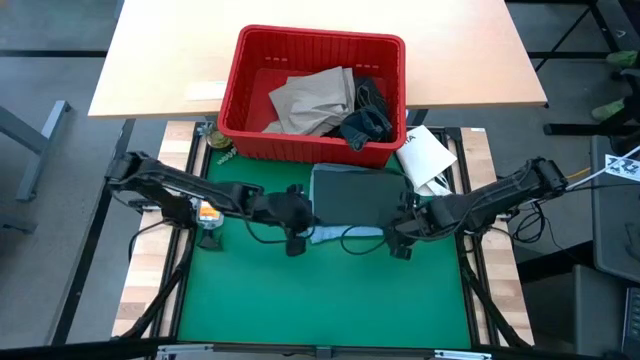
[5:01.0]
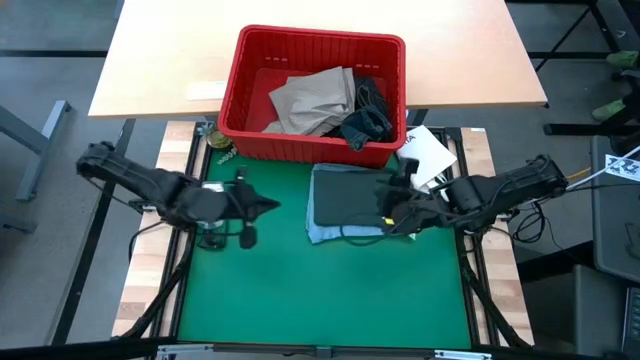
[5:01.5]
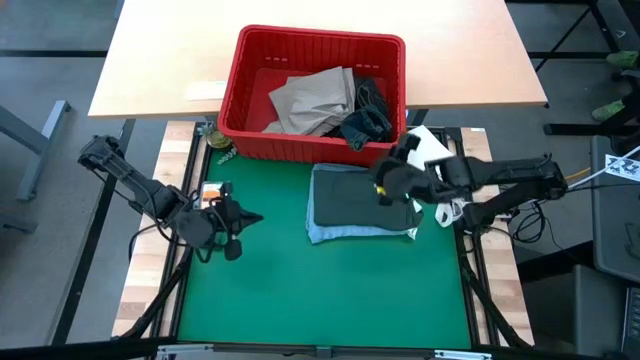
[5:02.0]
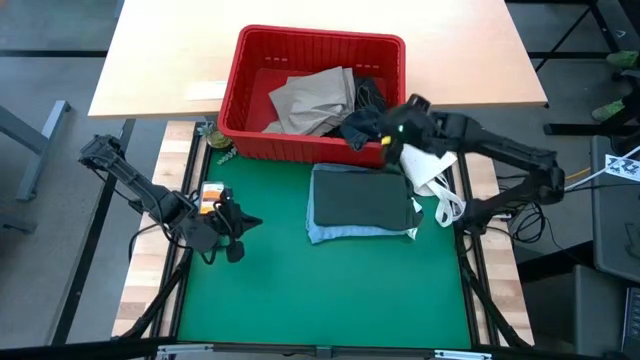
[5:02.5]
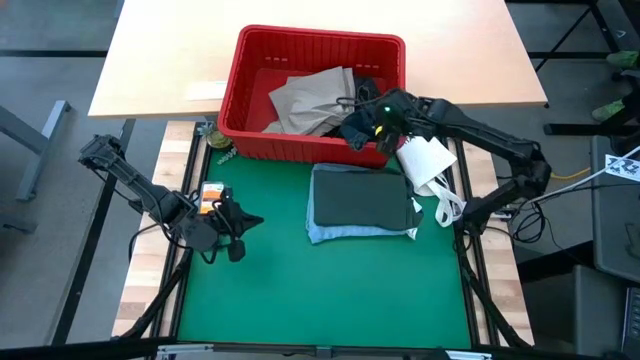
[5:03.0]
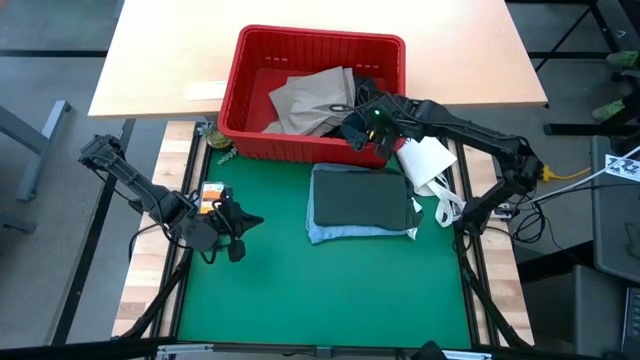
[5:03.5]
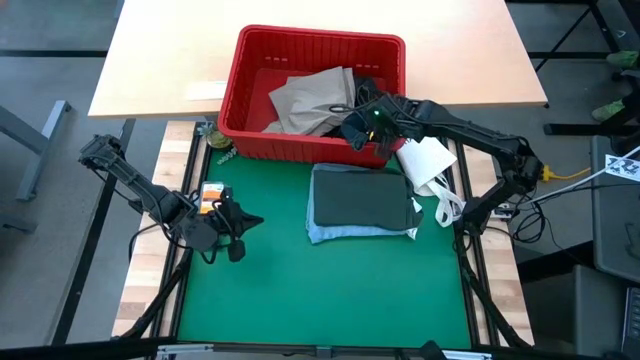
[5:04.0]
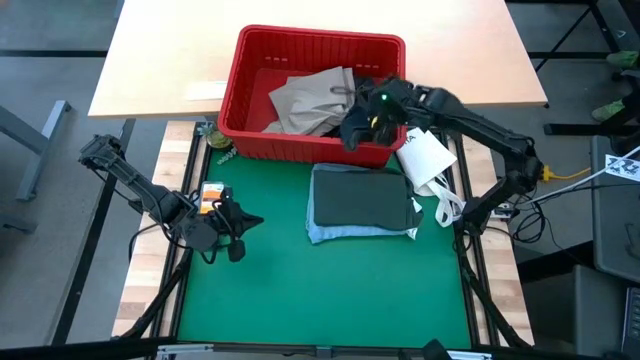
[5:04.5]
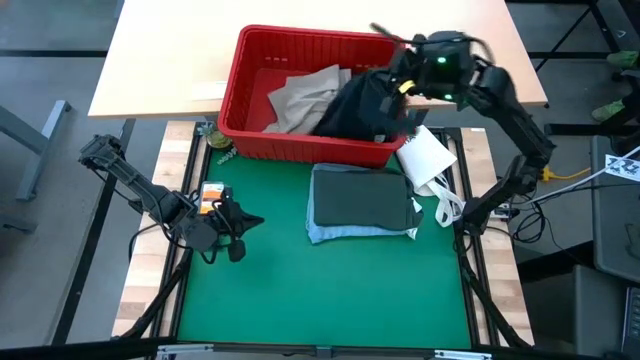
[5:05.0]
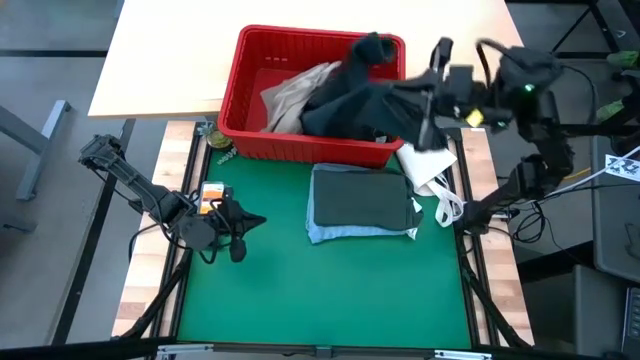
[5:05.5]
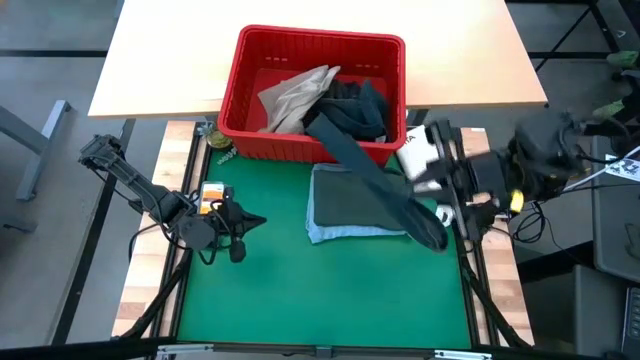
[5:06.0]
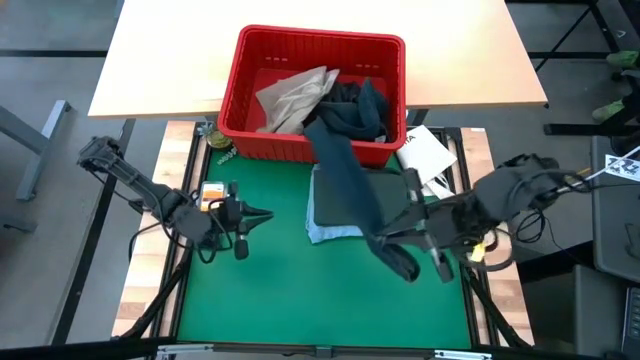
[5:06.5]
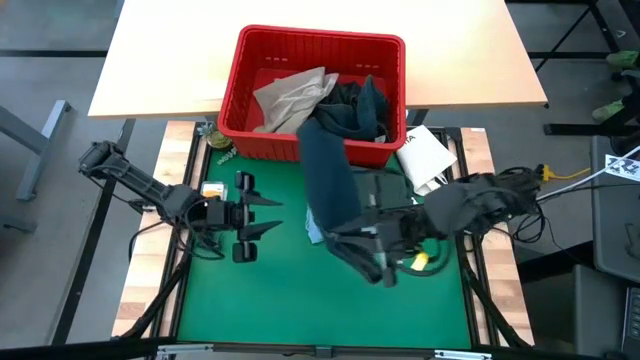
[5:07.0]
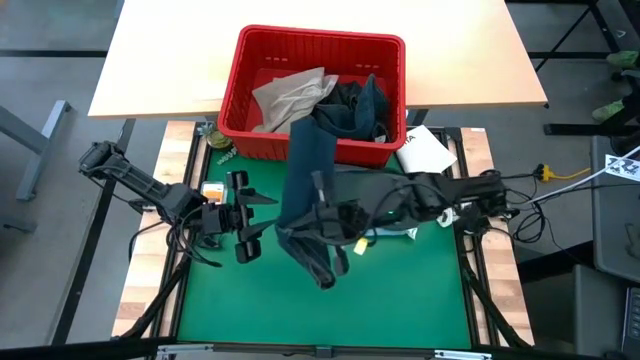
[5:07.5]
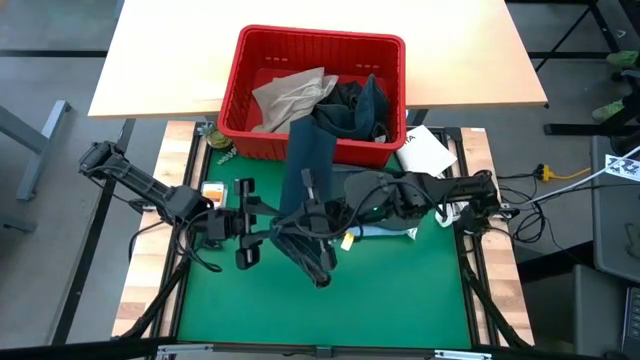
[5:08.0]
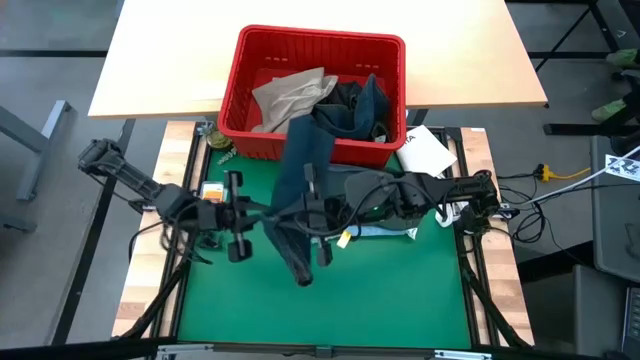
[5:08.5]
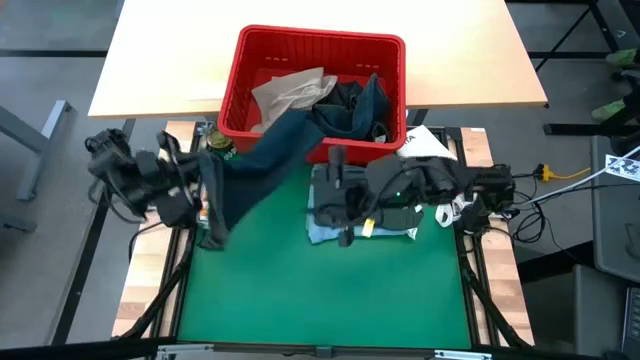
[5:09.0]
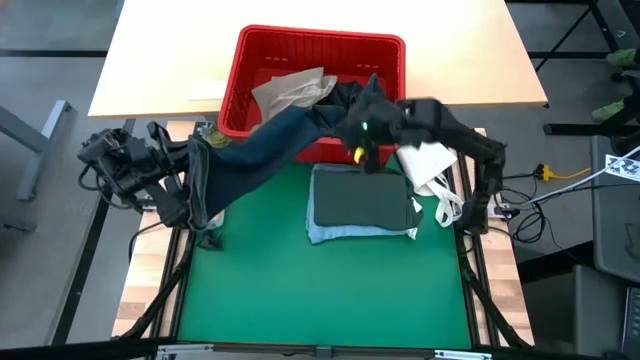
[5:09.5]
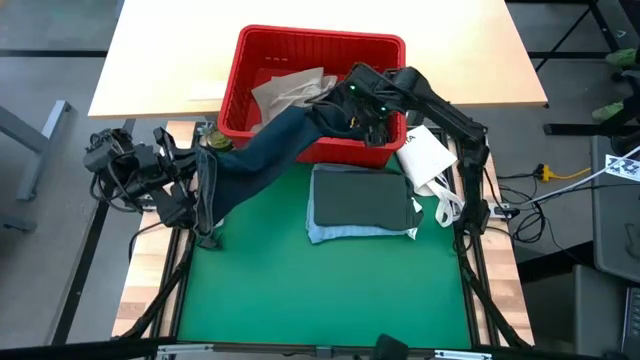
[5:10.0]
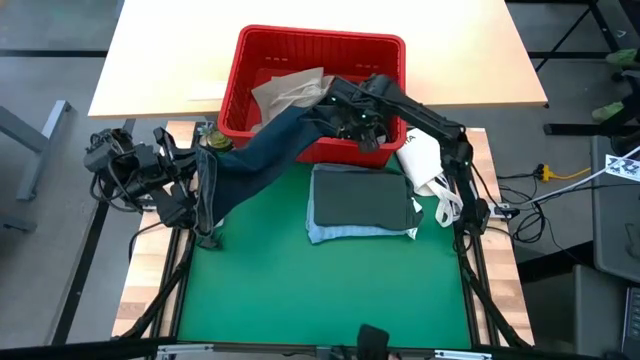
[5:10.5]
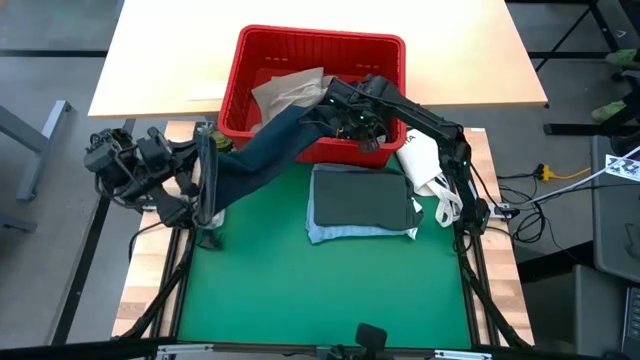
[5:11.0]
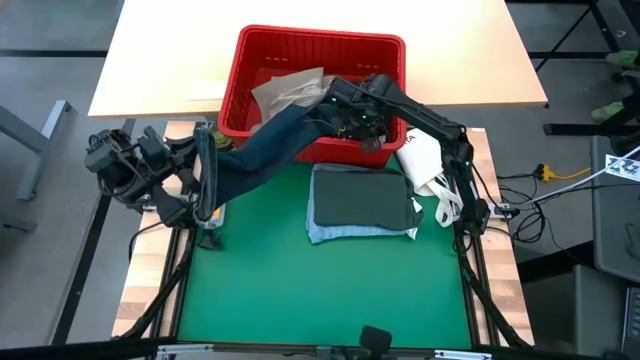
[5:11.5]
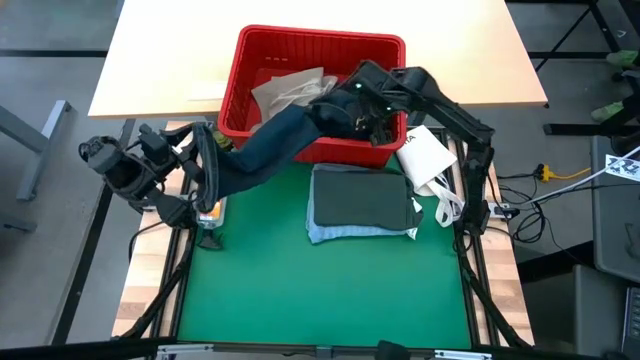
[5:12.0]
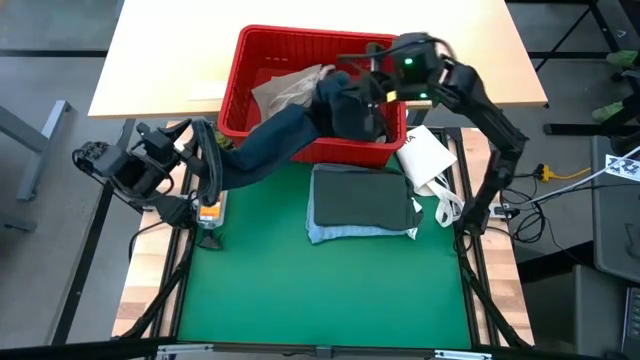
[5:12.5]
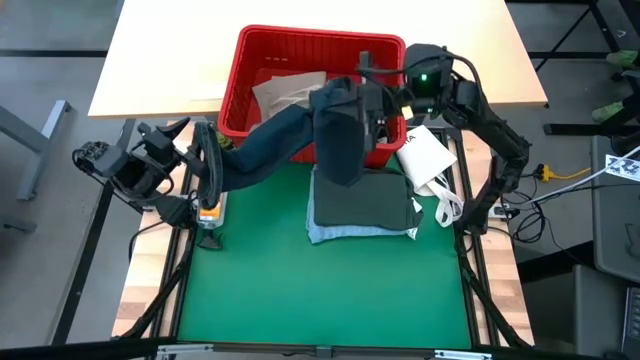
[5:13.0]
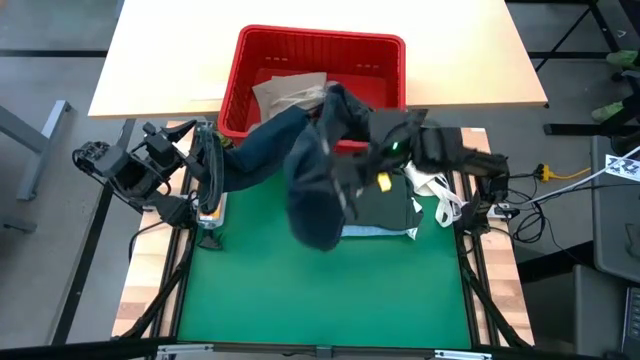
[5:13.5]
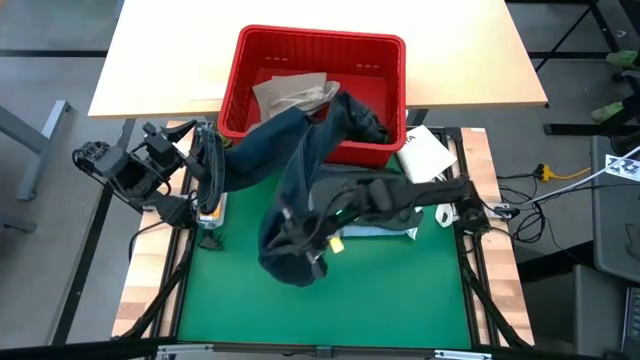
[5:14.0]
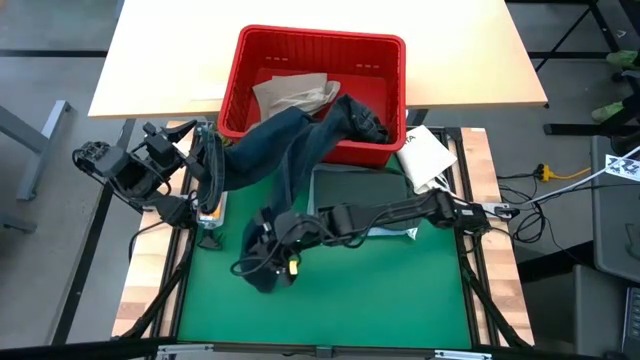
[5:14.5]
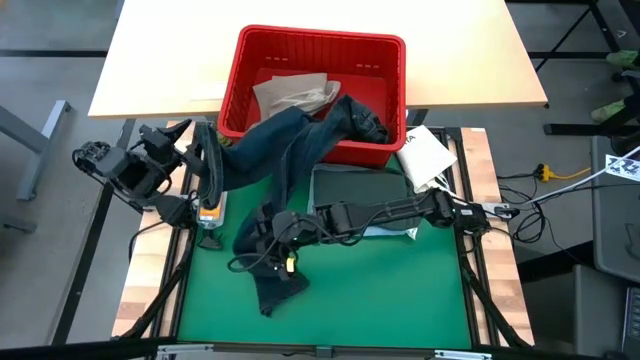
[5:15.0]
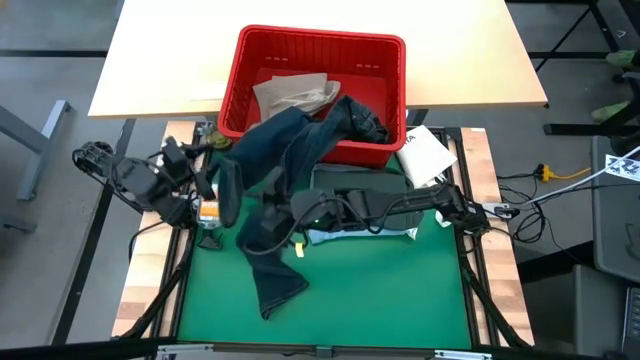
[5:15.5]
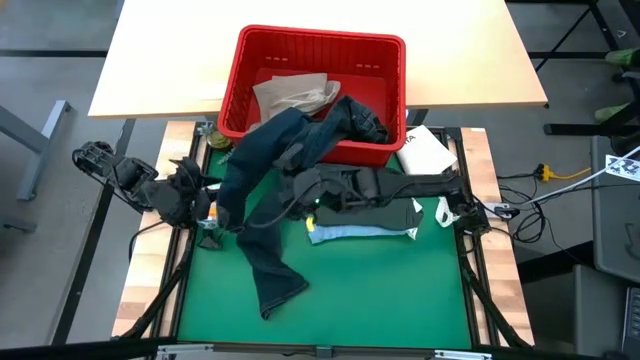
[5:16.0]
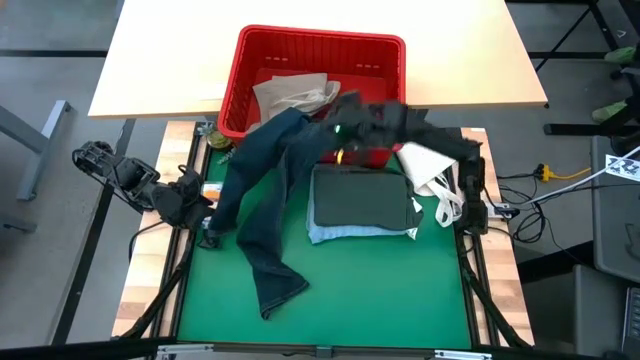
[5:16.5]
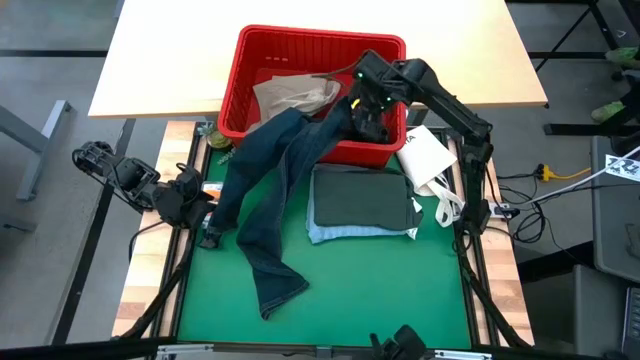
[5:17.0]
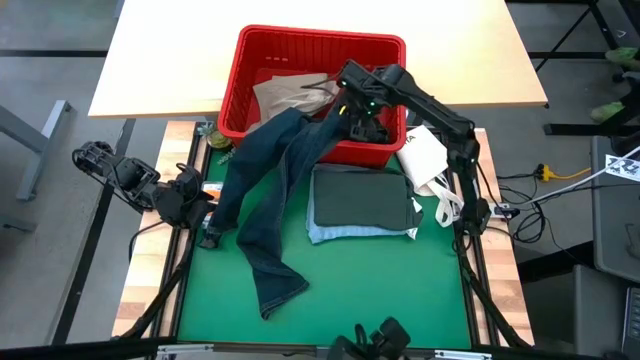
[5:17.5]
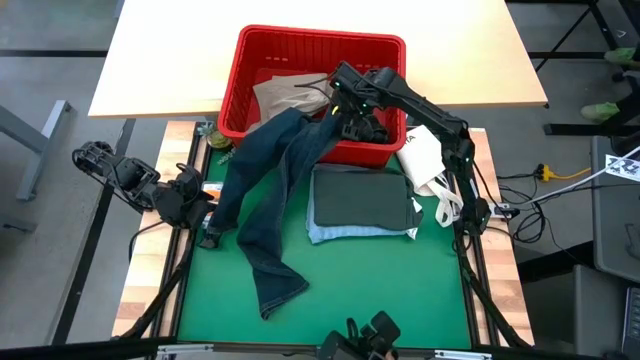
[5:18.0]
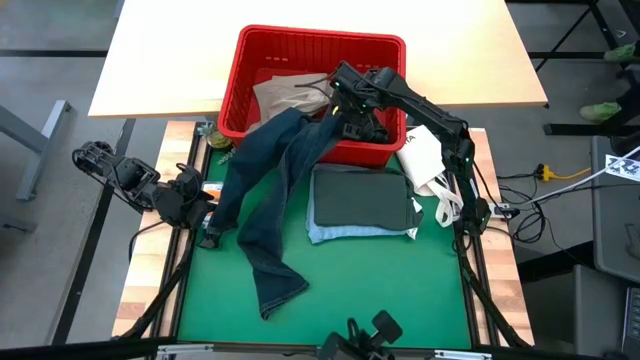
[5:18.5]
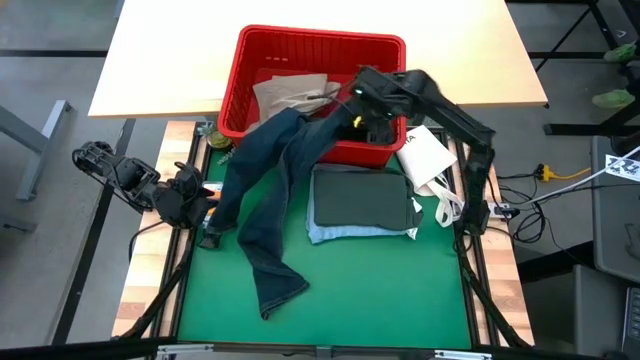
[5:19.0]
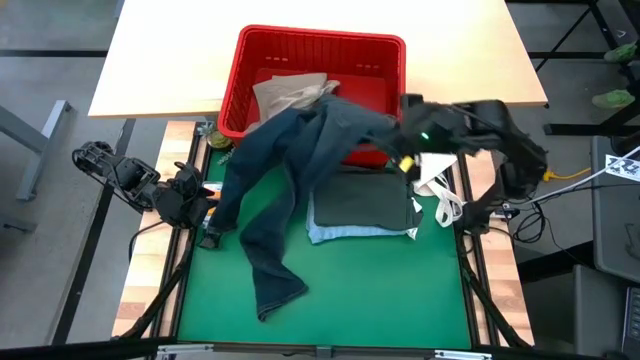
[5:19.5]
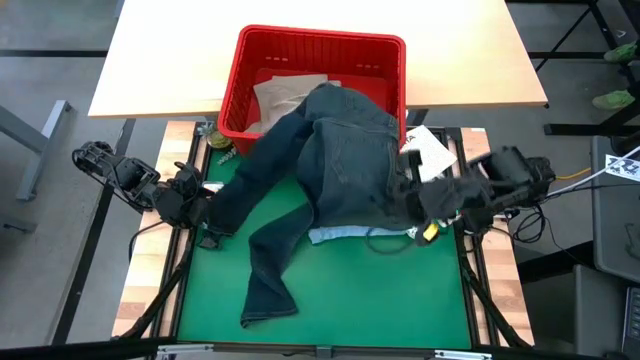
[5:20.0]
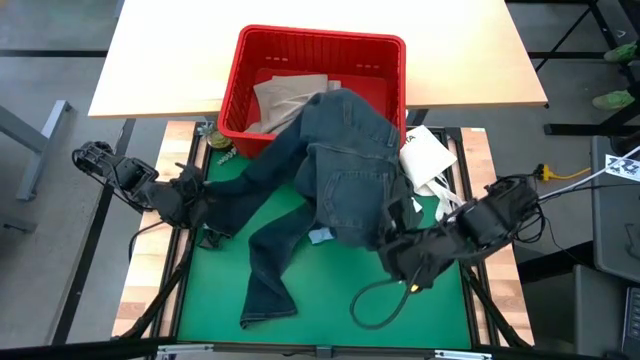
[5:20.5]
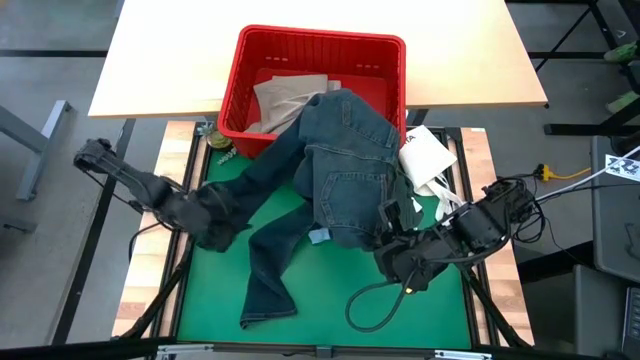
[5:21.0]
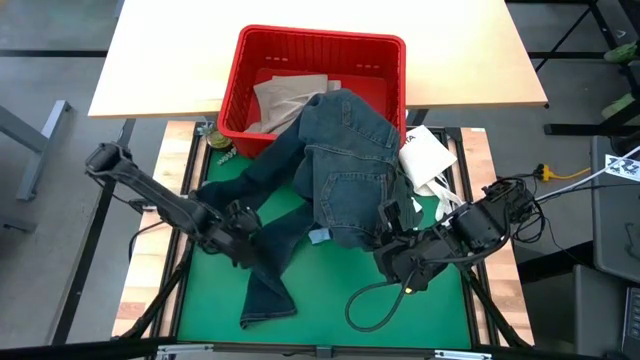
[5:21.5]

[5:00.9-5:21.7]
Task: Fold Laundry from Bin
Fold the dark blue pants
